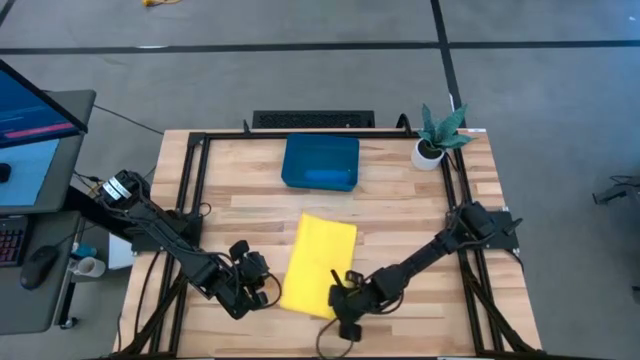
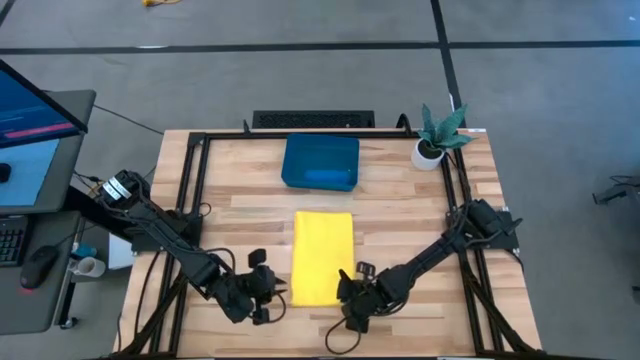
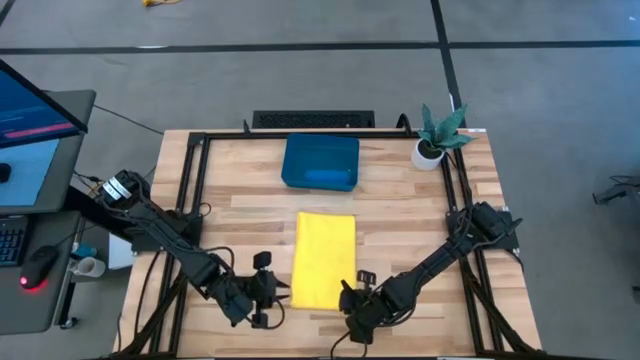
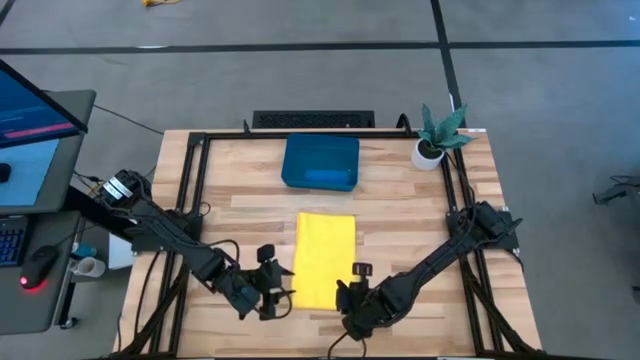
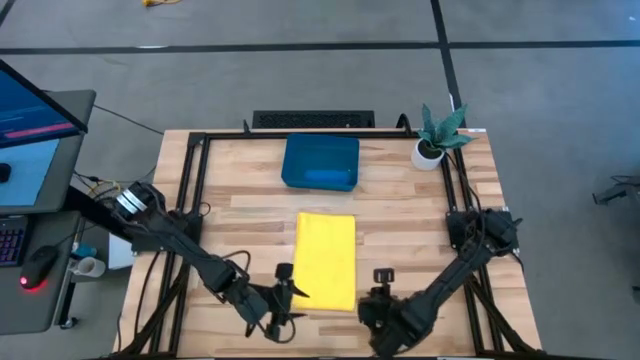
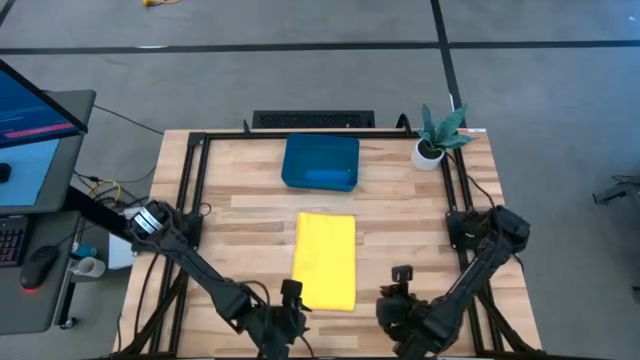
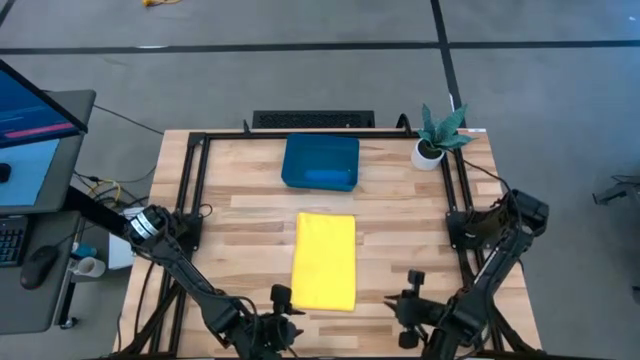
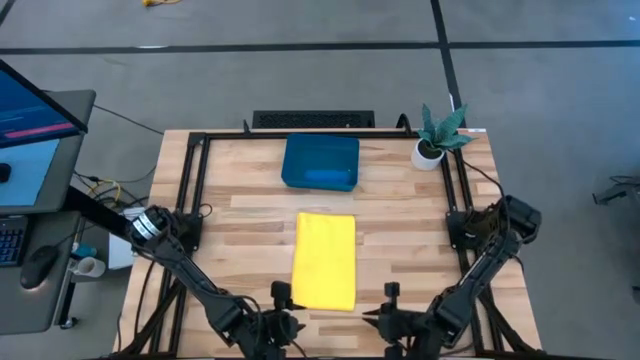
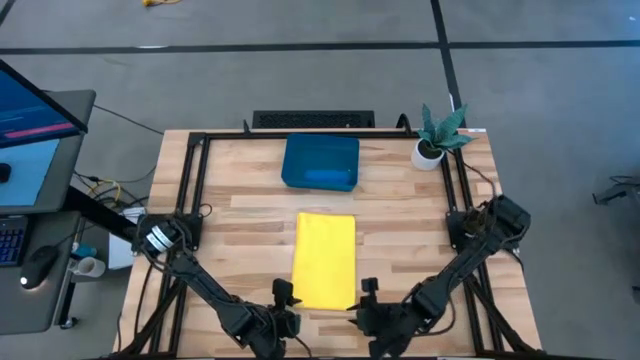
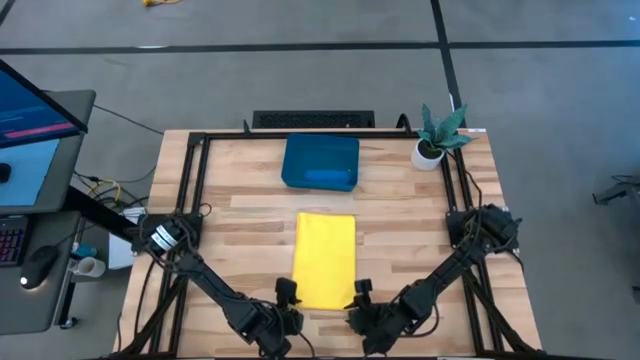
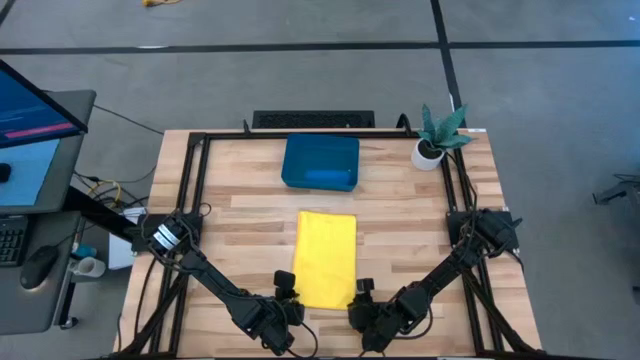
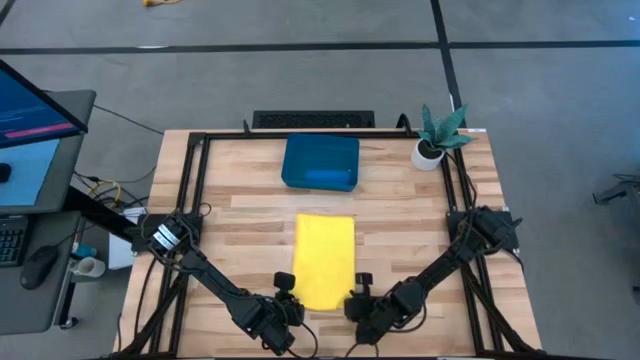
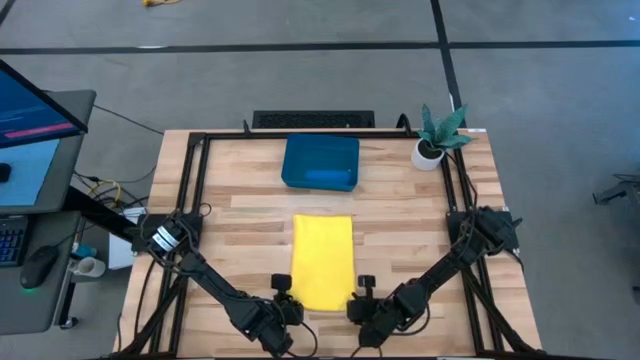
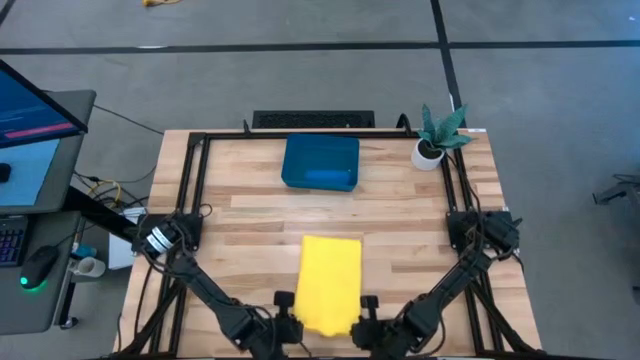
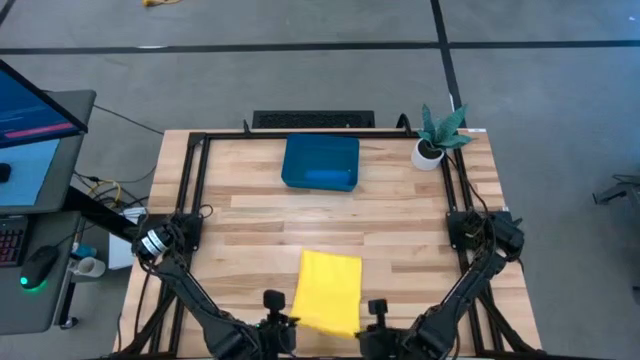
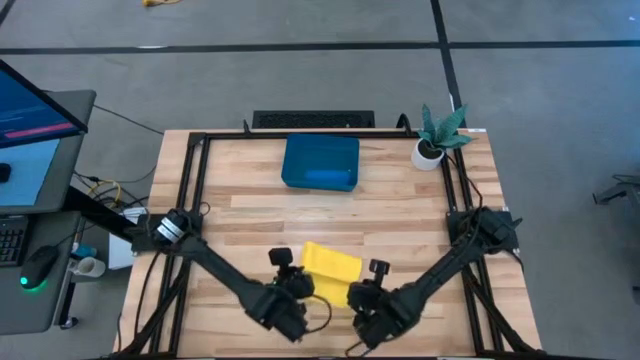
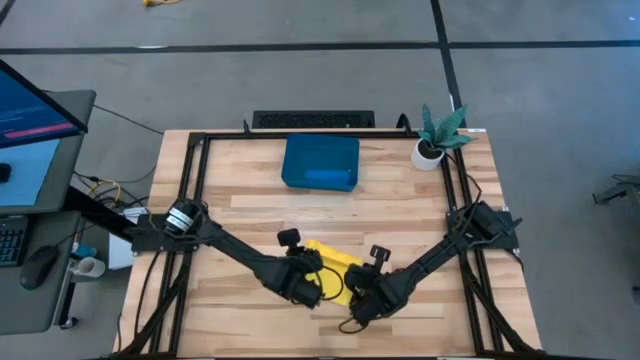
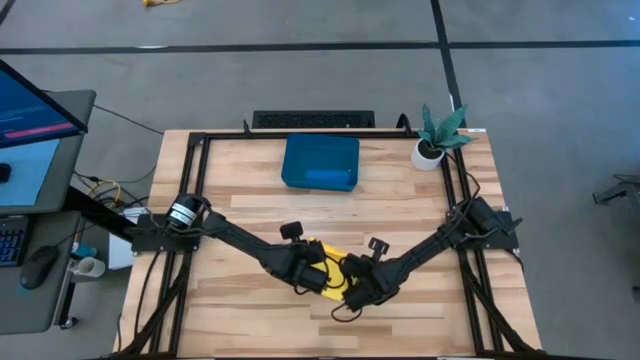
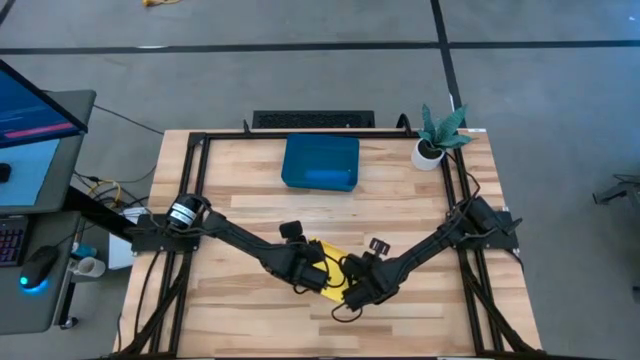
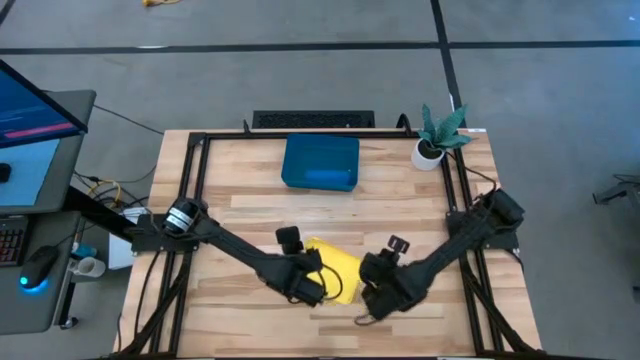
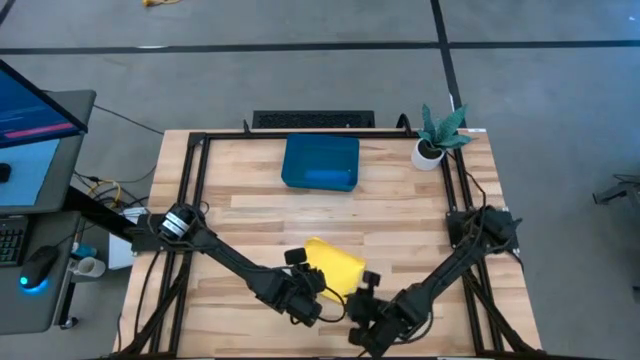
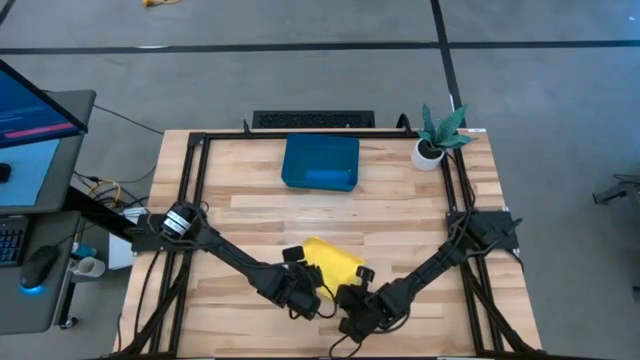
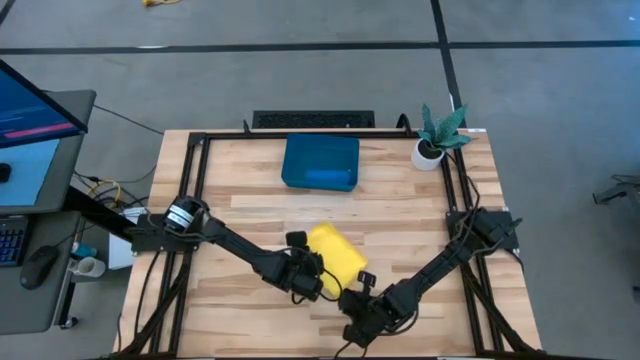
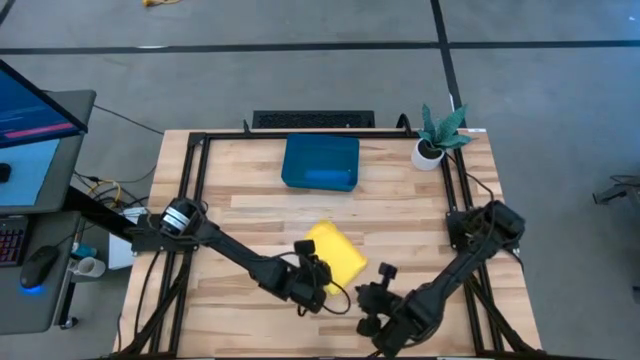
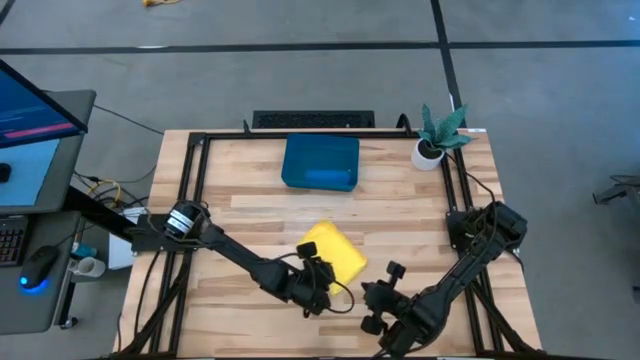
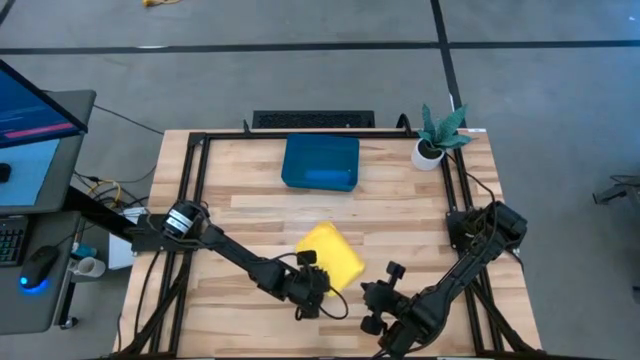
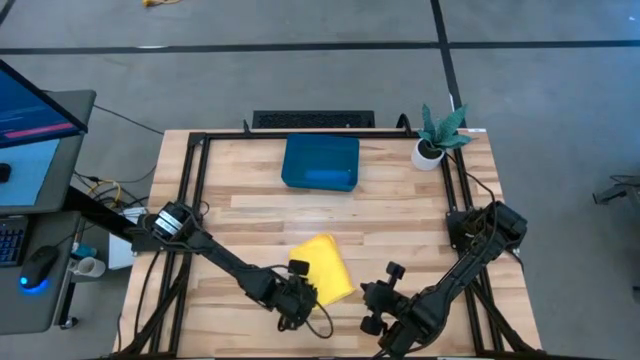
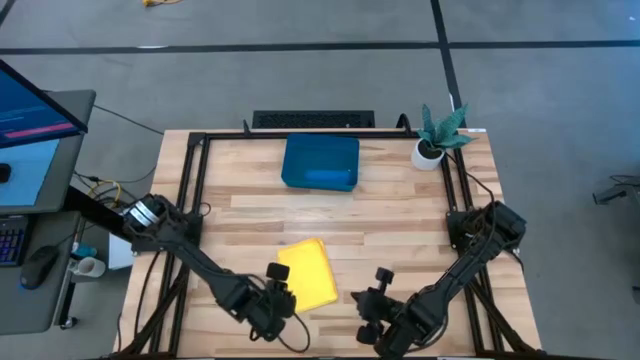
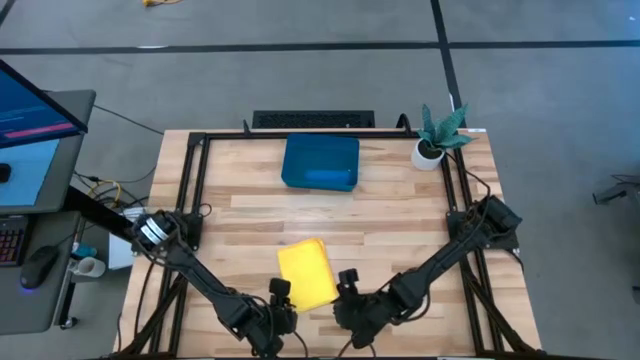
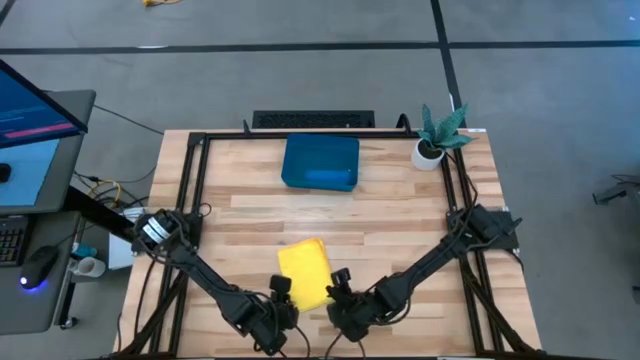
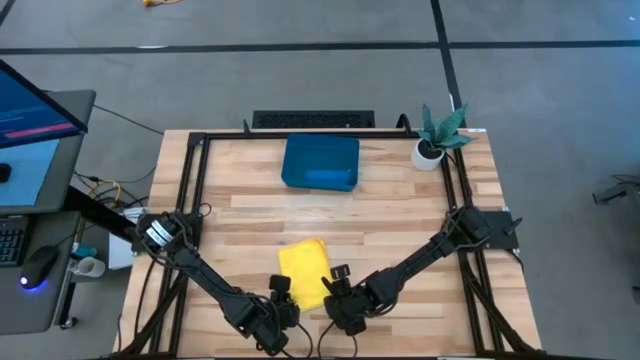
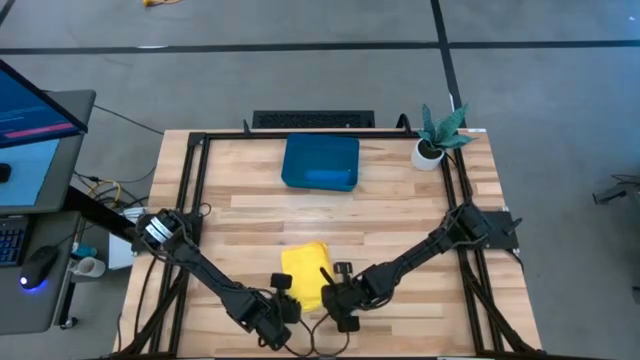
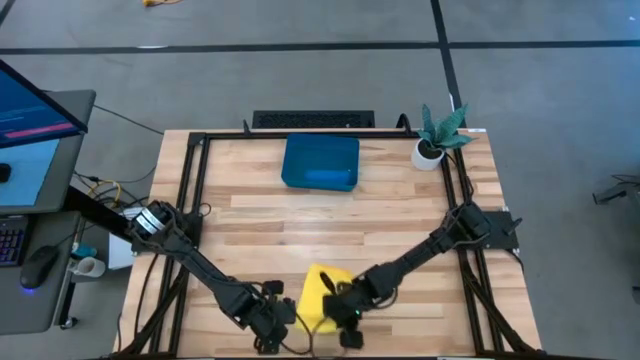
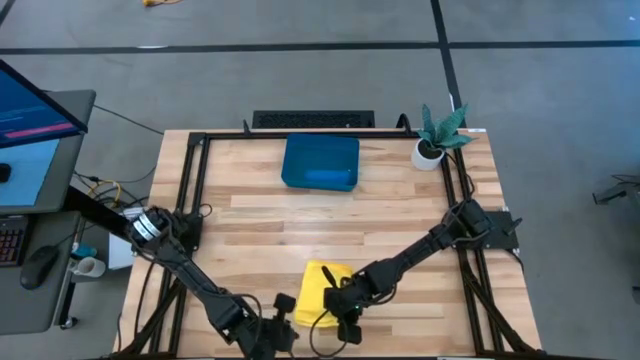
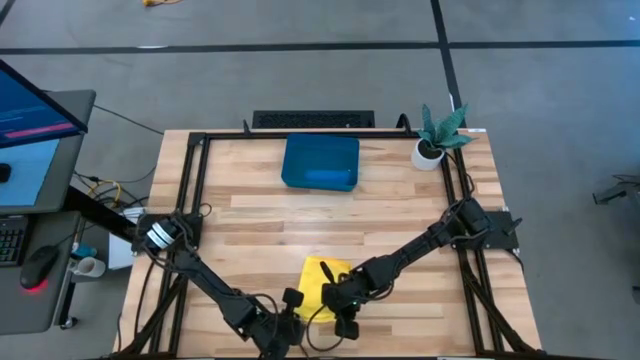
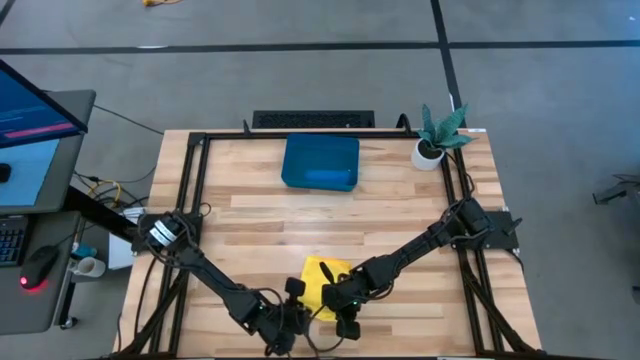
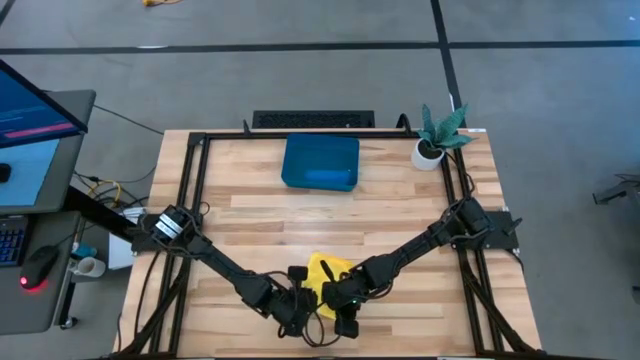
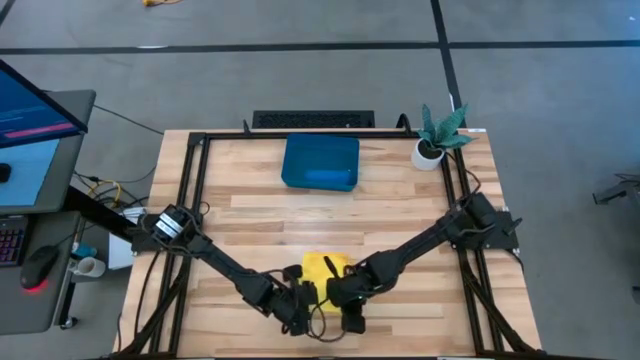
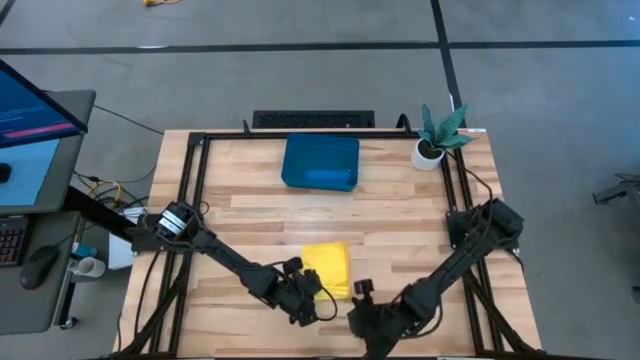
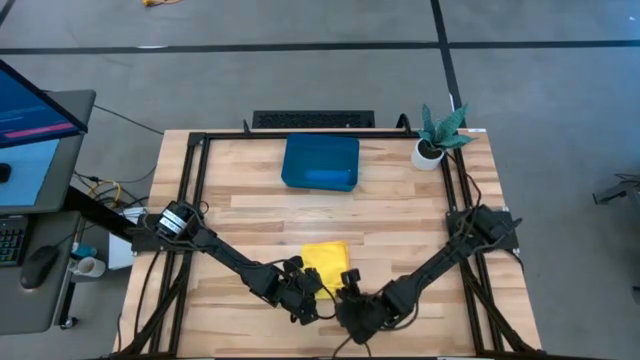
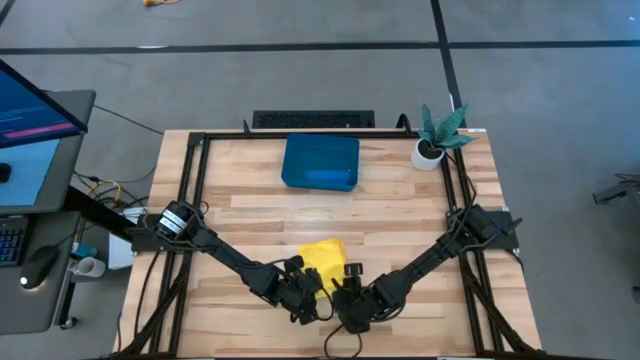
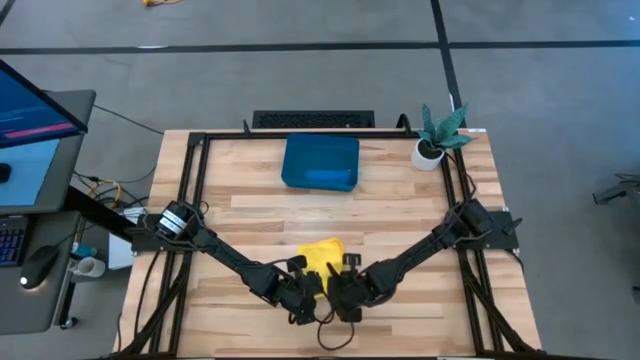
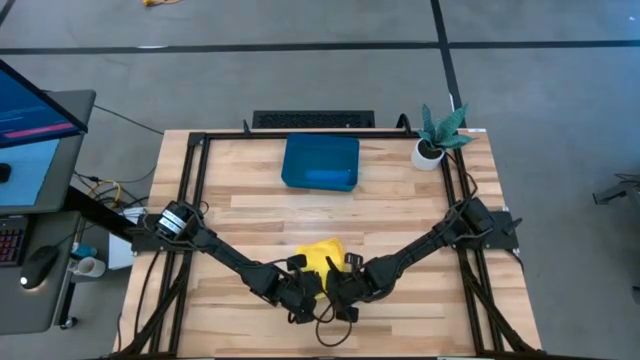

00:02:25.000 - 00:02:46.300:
Task: Roll microfiber towels into tight, uniform cylinder then place into a basket
Roll the yellow microfiber cloth
